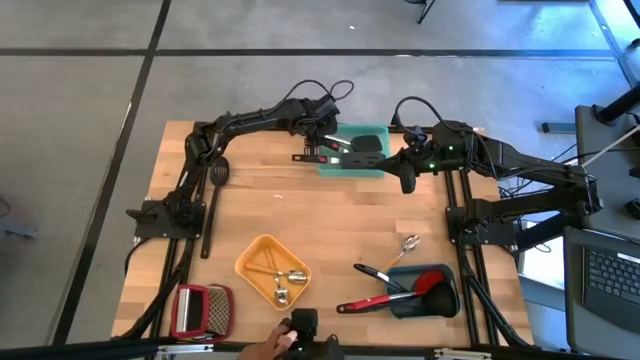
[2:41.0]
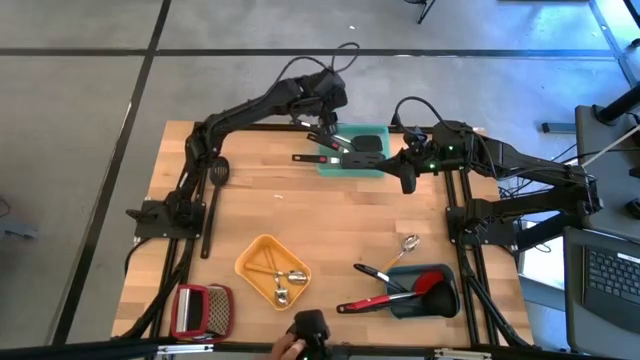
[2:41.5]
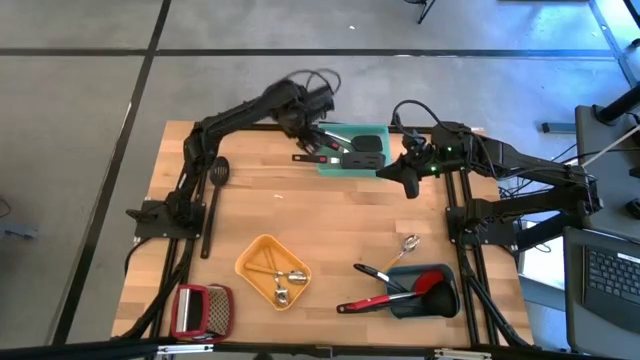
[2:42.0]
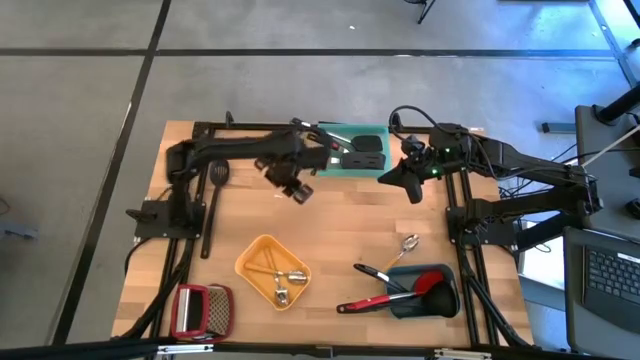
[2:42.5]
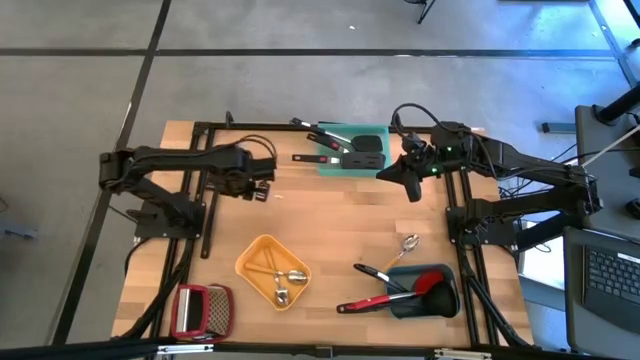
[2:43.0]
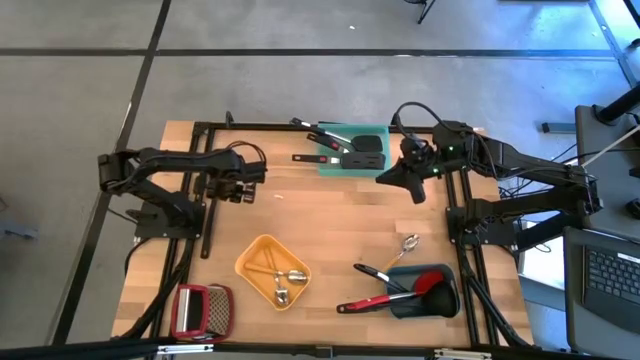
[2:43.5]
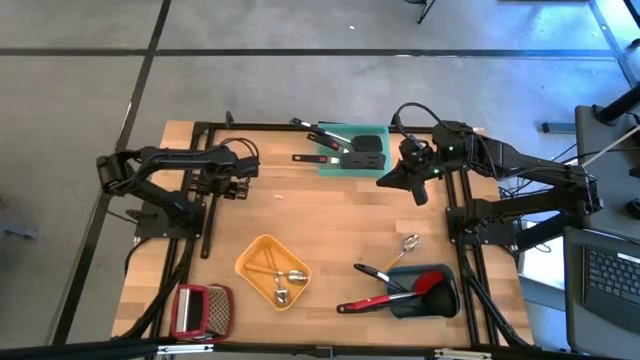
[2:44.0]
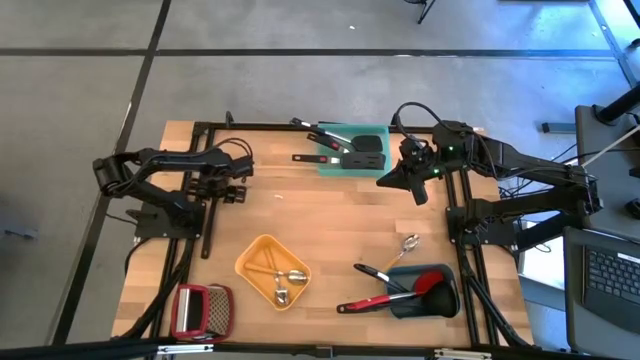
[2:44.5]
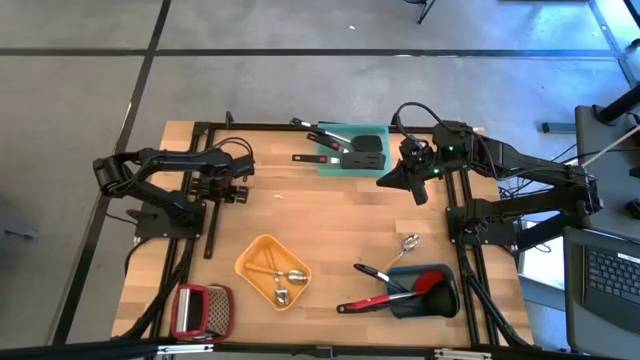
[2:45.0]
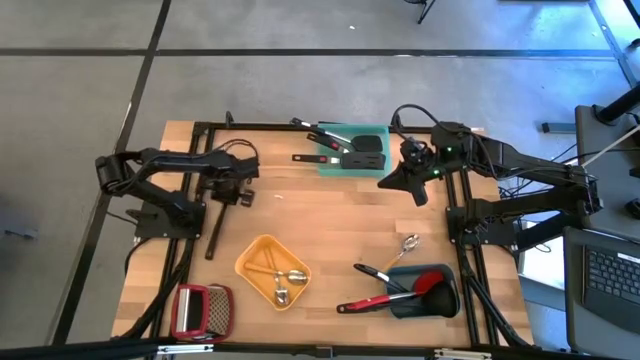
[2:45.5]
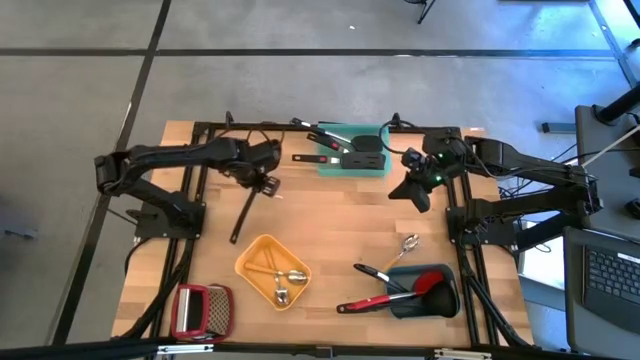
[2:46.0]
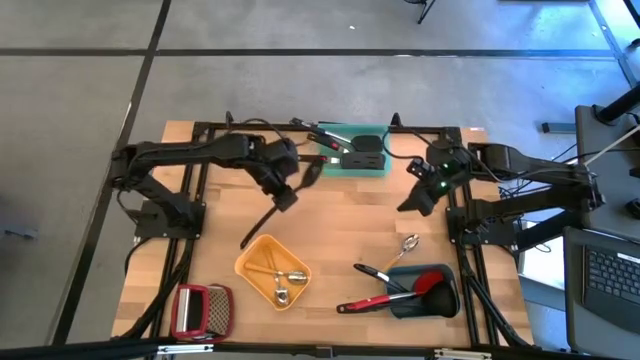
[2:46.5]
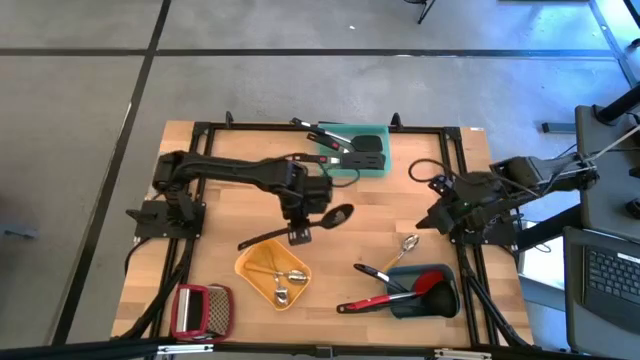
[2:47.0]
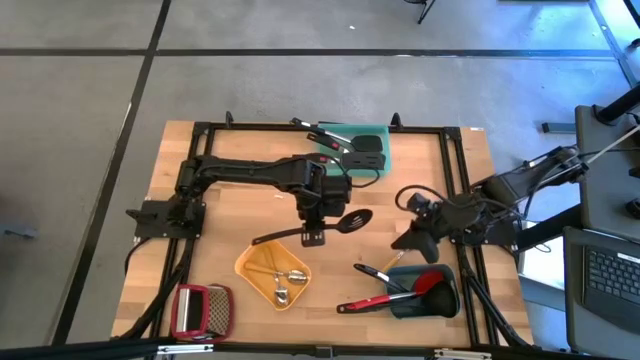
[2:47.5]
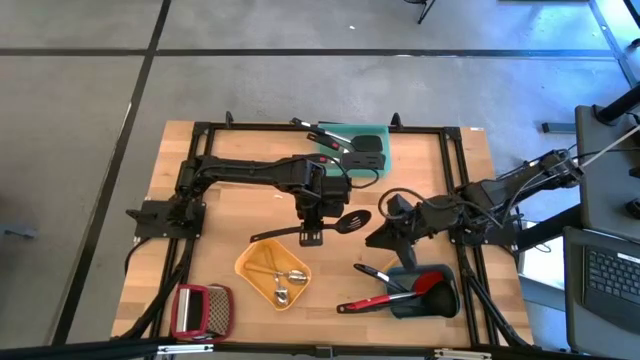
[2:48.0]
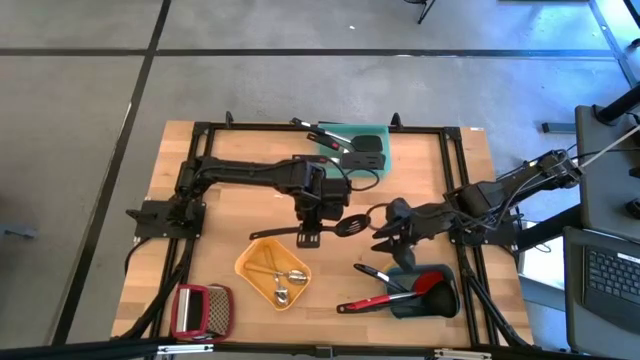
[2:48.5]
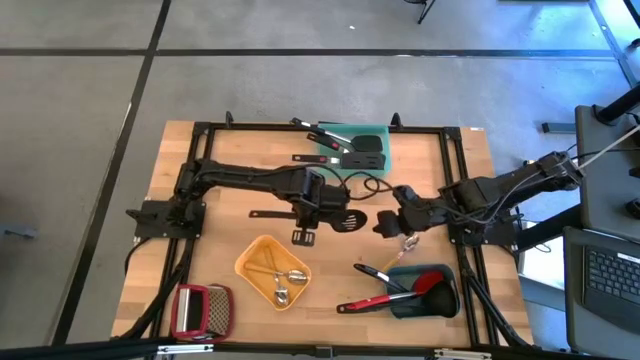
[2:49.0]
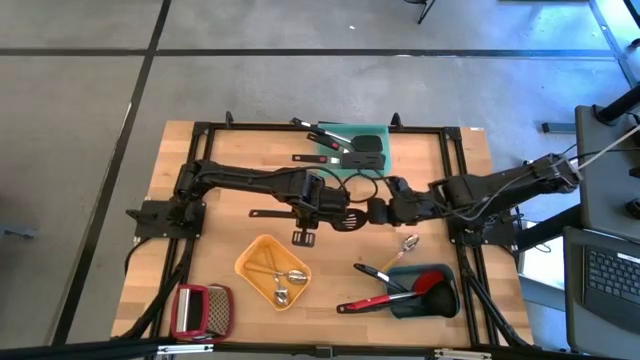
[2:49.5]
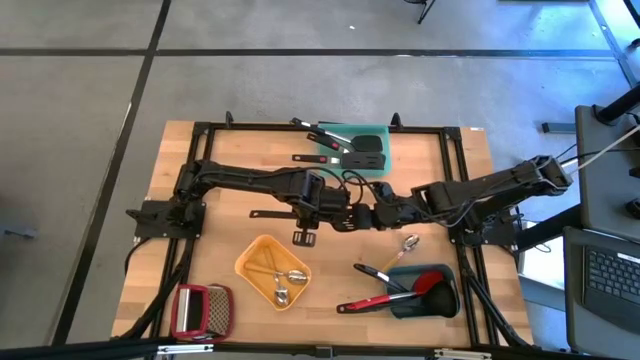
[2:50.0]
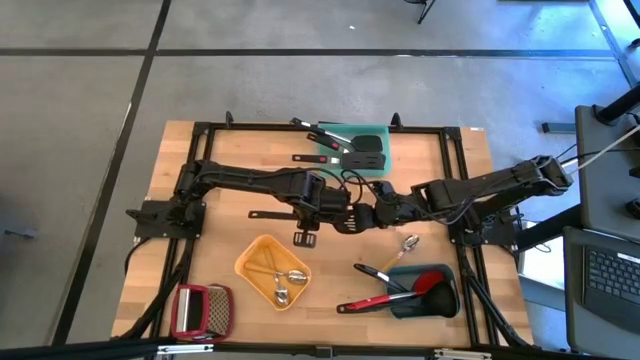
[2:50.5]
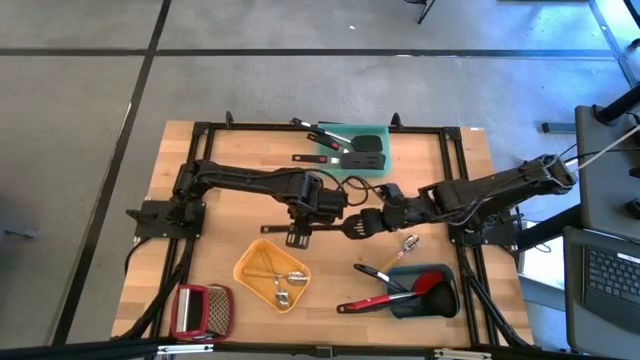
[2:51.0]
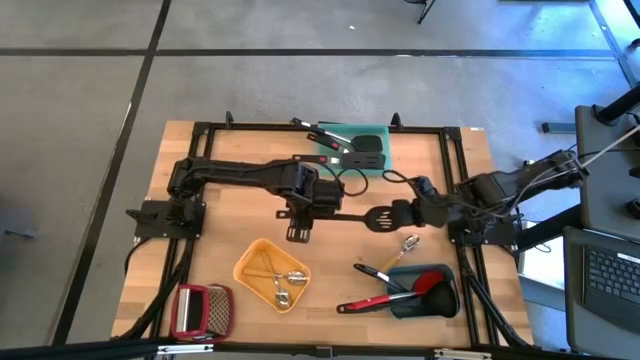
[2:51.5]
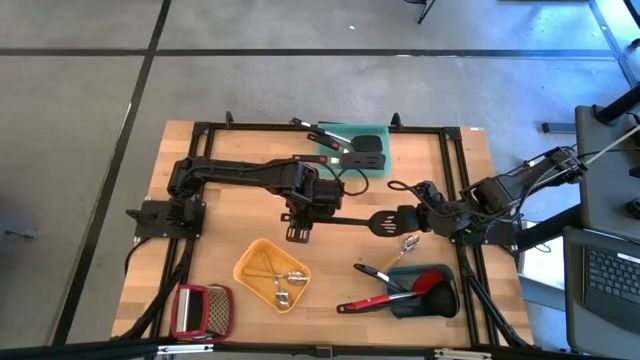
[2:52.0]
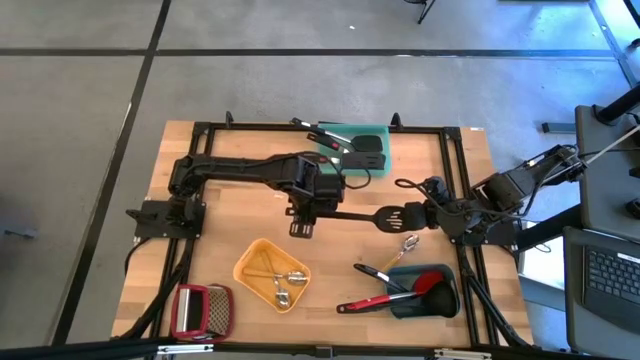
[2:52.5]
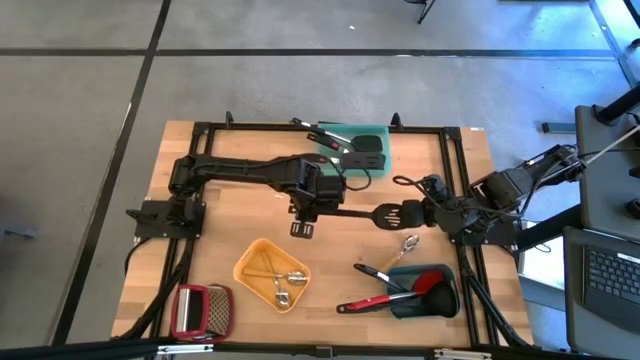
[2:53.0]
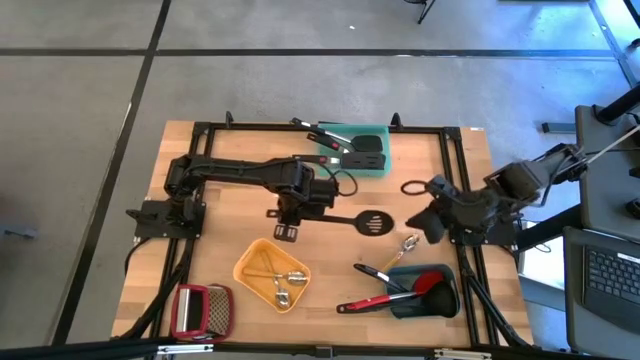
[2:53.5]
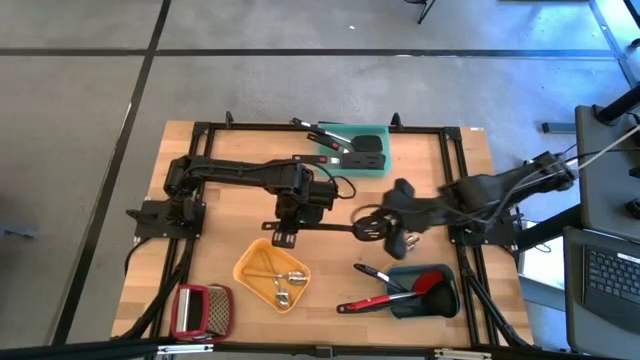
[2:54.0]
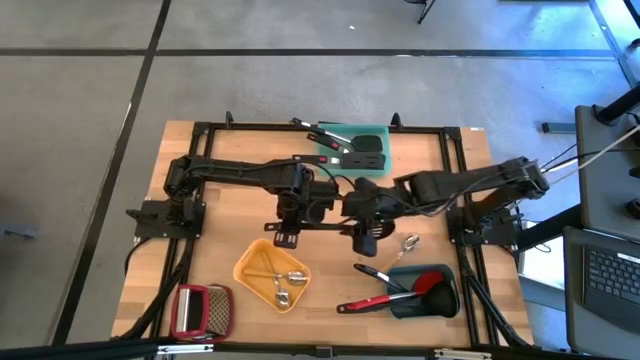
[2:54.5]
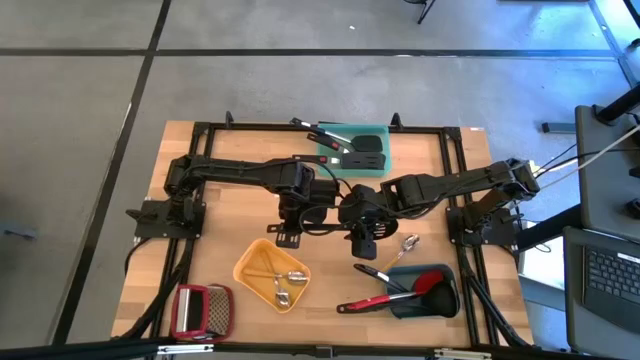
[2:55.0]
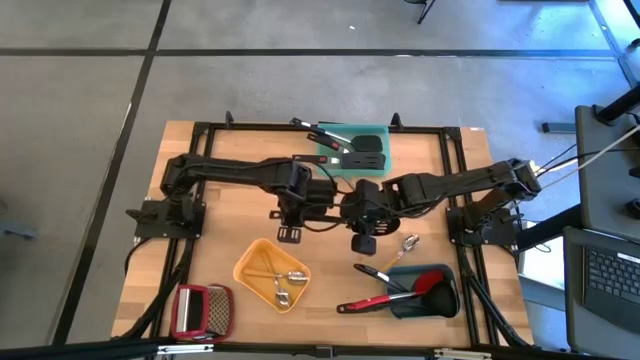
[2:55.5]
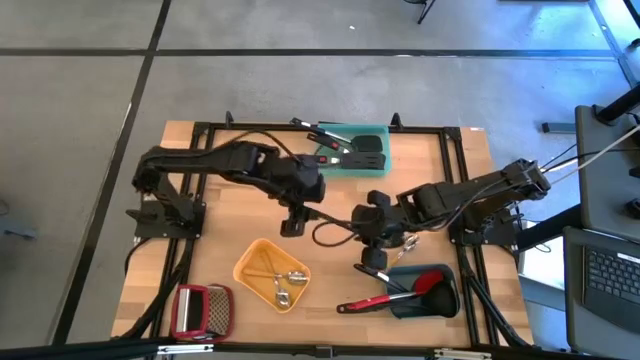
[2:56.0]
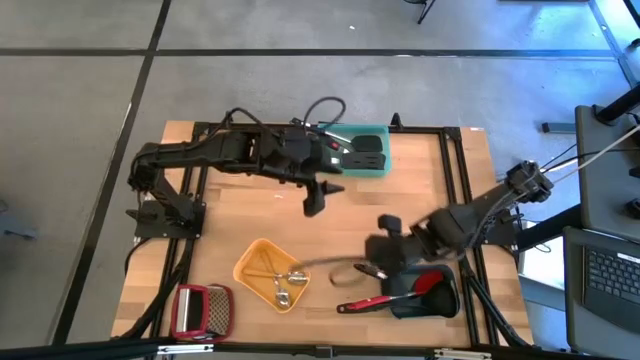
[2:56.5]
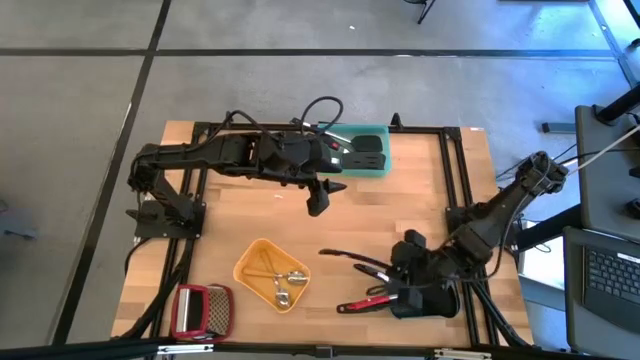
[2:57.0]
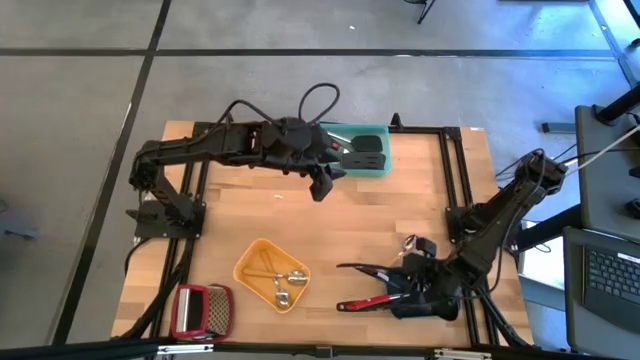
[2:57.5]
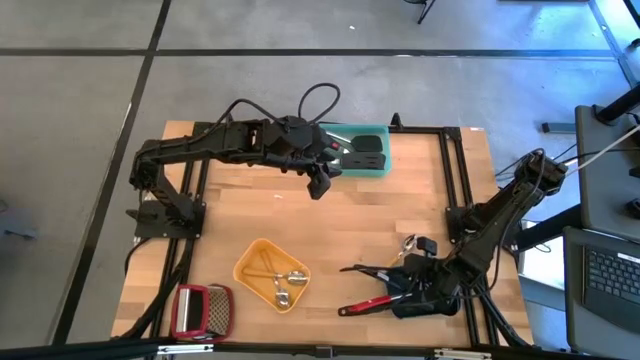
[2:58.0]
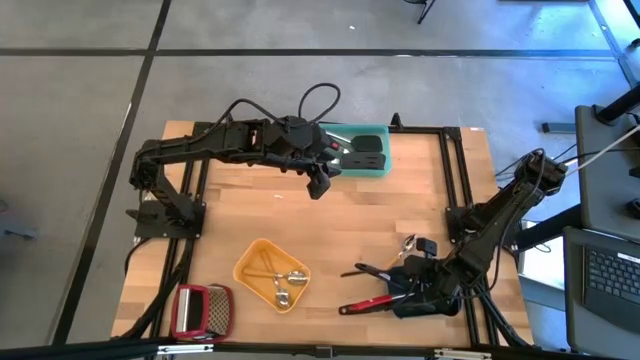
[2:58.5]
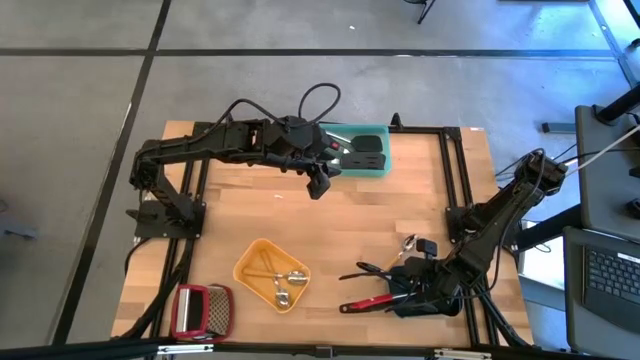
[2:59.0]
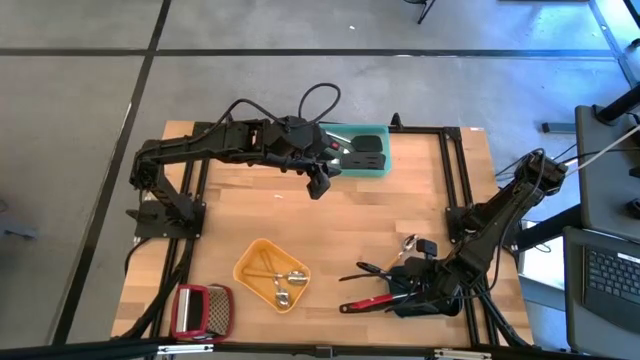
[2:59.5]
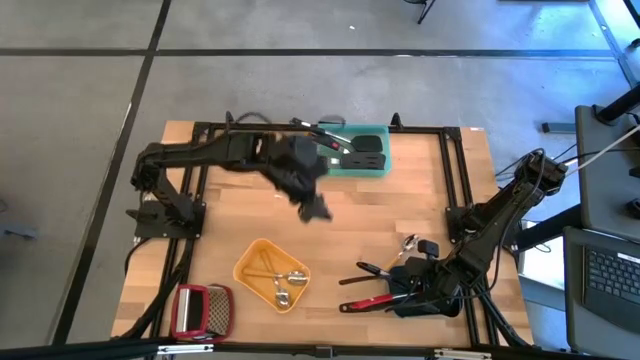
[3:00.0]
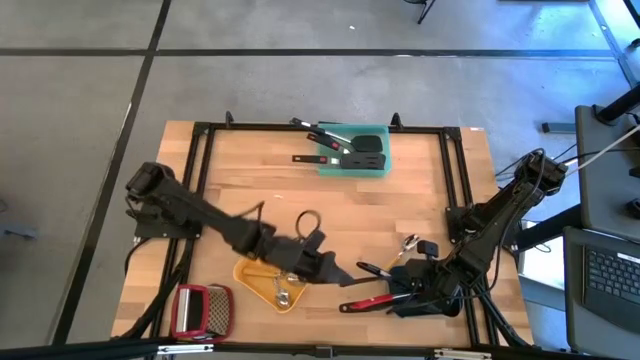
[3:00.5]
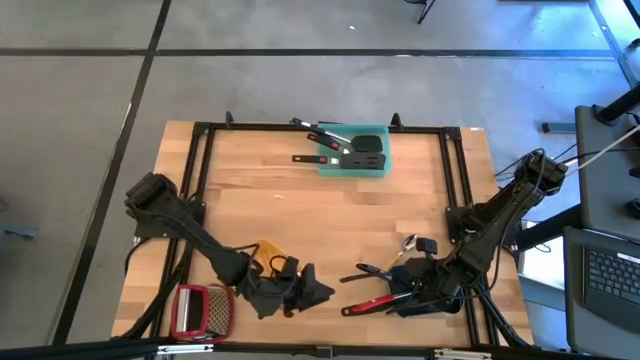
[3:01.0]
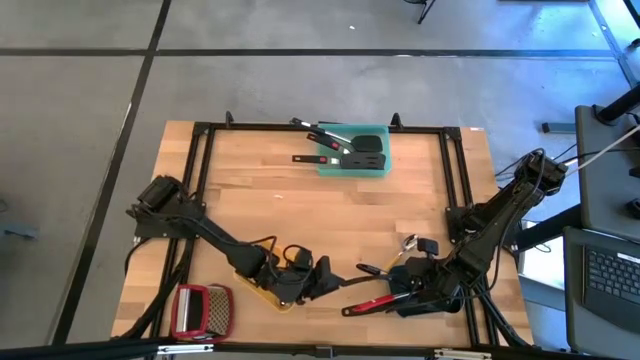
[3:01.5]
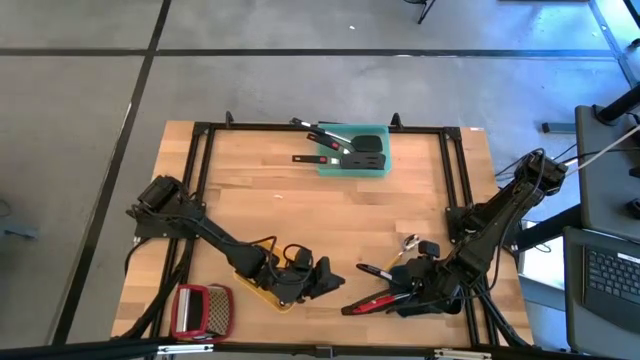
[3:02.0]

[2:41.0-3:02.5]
Task: Pick & Place Kitchen Items
Put the black spatula into the green bin

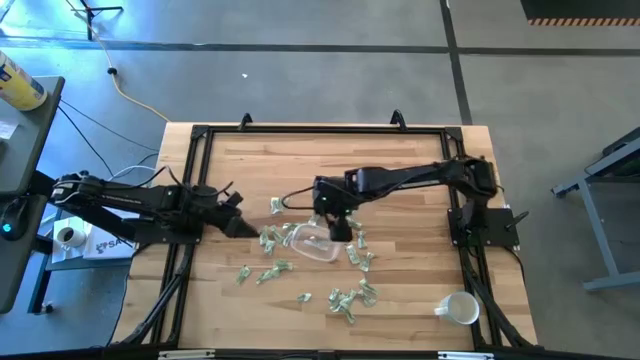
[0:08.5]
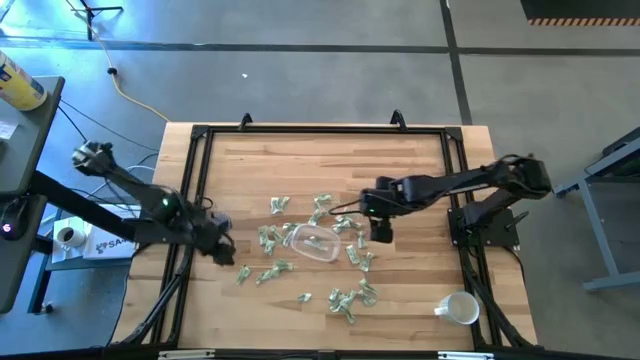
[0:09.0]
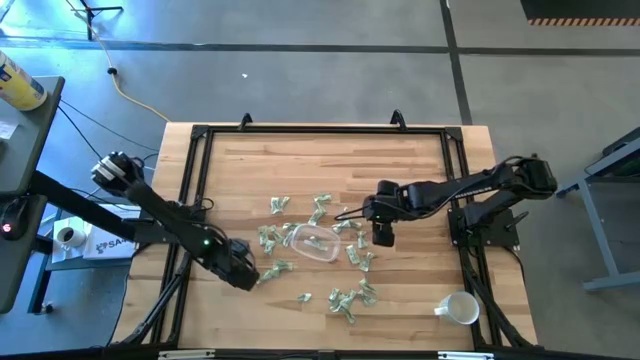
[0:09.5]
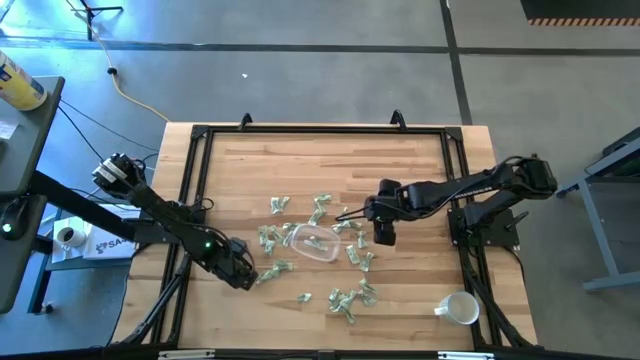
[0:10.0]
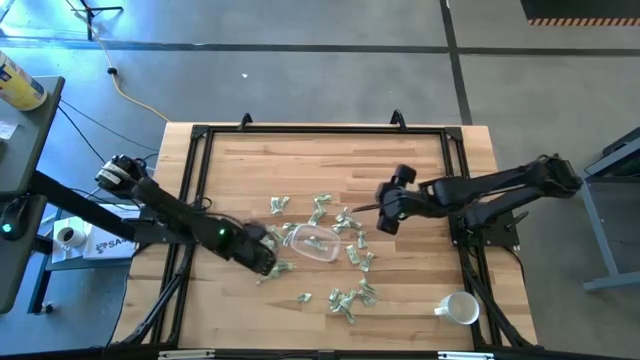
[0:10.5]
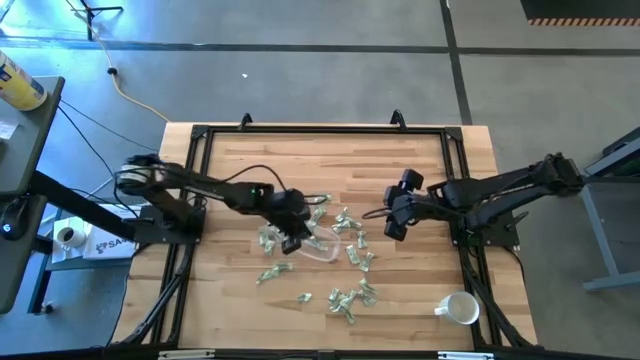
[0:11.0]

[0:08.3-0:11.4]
Task: Pick and place Stevia / Truvia into bins
Put the green stevia packet into the transparent bin
